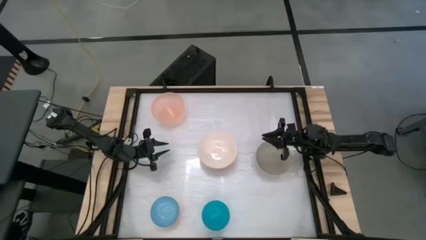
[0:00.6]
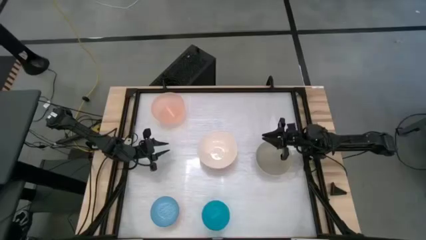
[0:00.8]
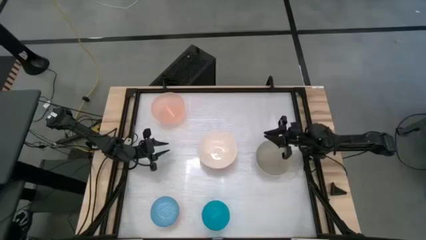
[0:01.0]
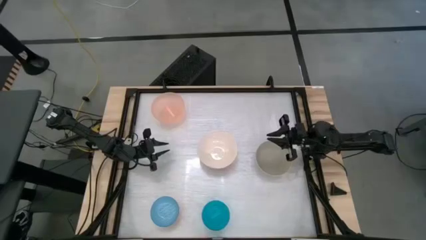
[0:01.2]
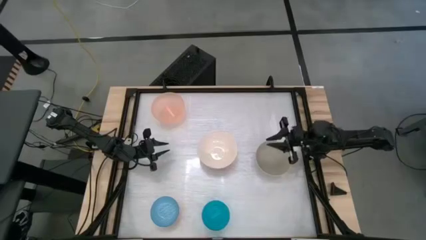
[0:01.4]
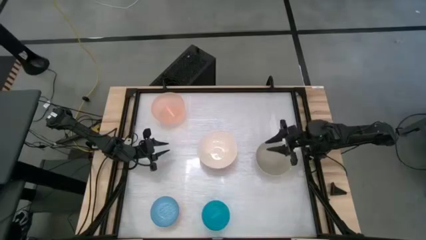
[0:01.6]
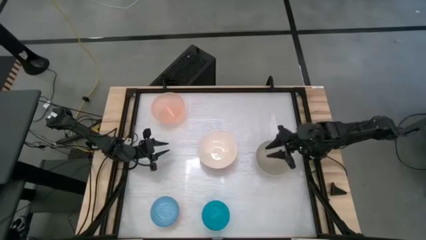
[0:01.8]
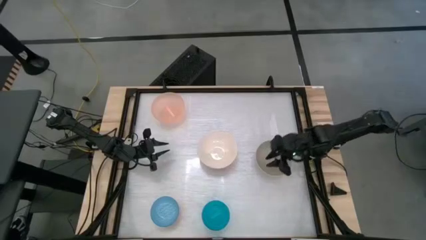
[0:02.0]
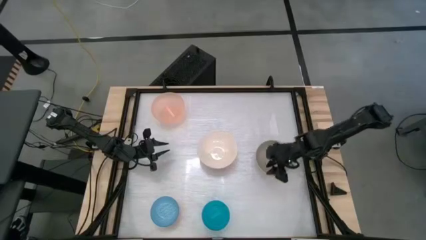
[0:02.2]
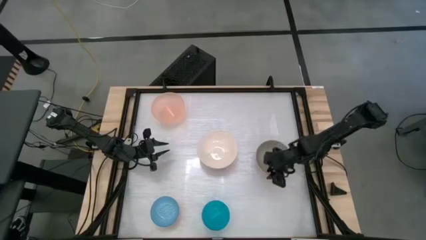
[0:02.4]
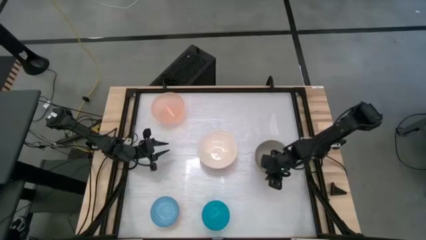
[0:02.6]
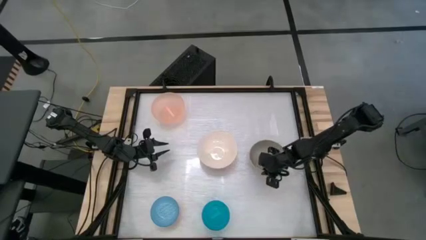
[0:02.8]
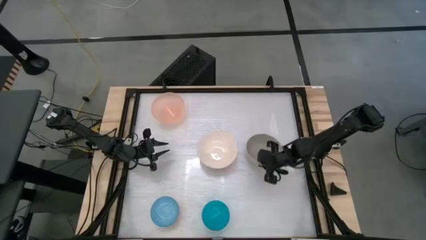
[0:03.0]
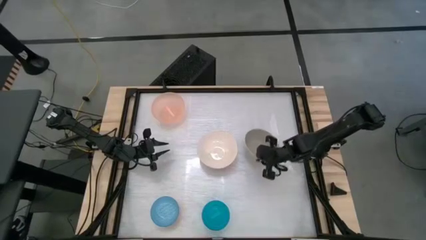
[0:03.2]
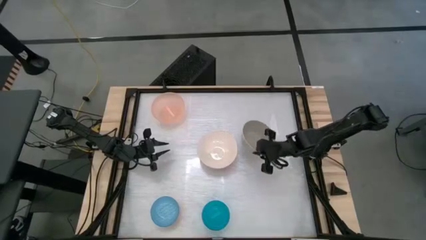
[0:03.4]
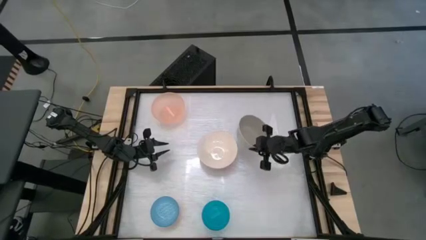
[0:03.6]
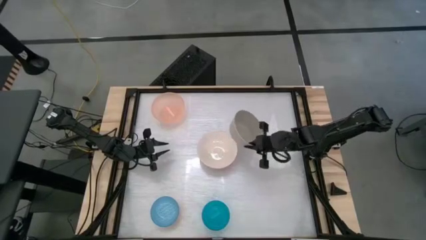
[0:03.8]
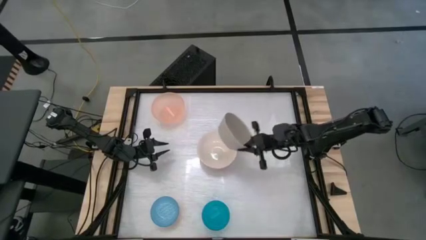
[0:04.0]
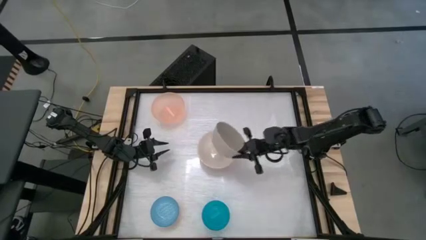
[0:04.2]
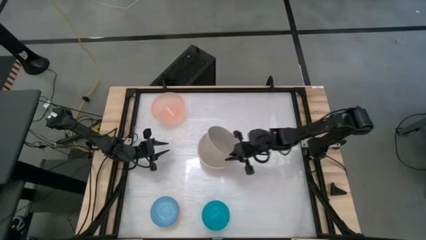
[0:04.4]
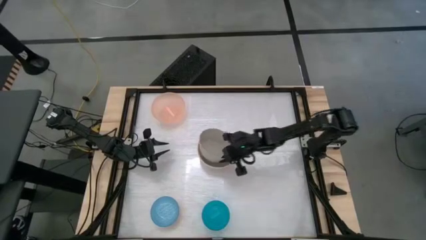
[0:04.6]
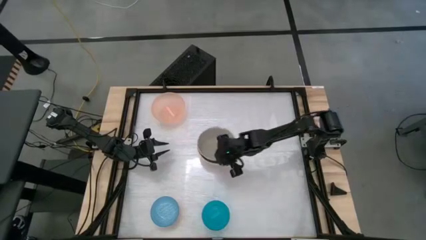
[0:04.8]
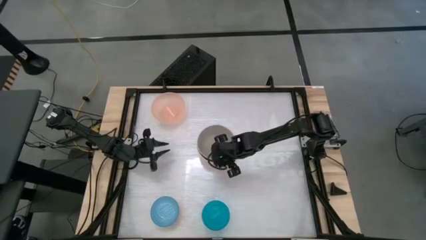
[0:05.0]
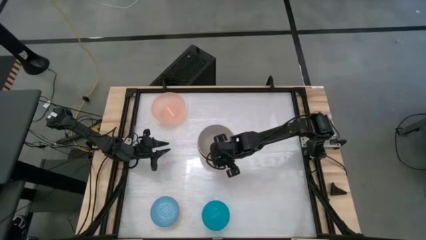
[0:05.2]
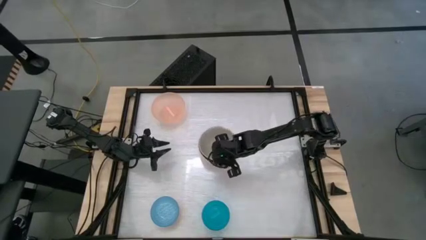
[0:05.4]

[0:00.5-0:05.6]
Stack the gray bowl on top of the white bowl

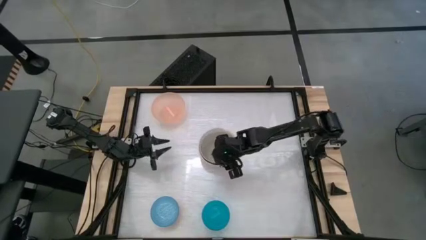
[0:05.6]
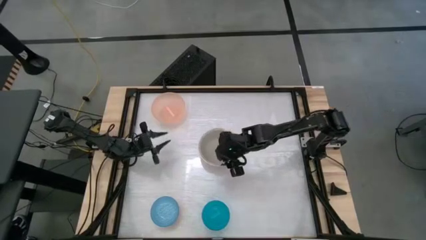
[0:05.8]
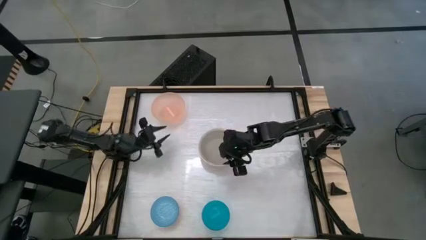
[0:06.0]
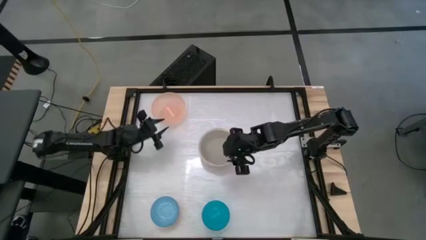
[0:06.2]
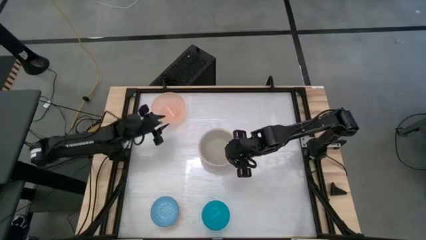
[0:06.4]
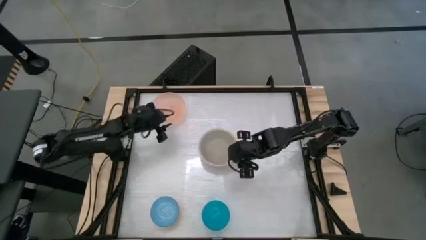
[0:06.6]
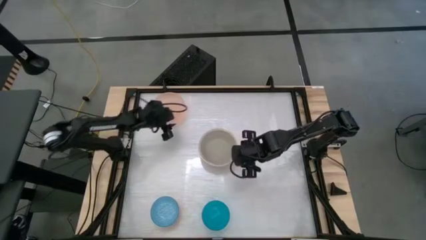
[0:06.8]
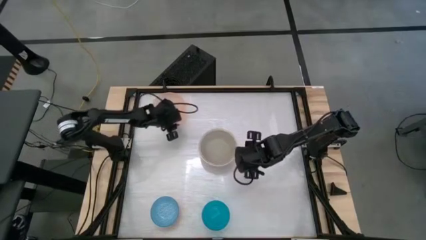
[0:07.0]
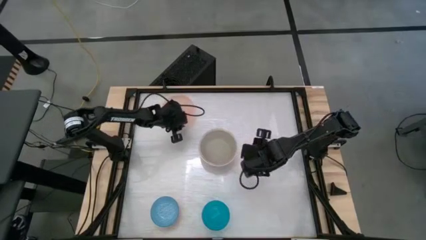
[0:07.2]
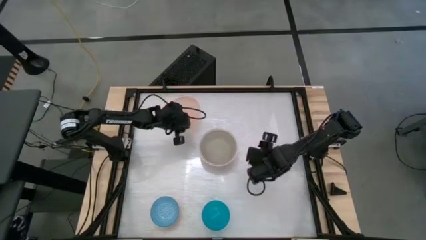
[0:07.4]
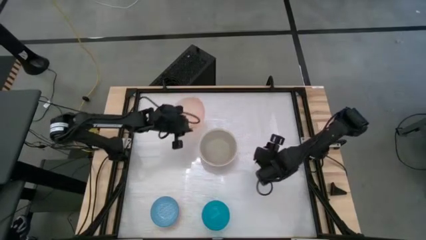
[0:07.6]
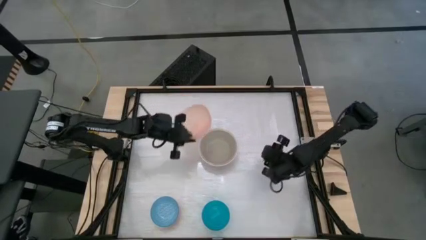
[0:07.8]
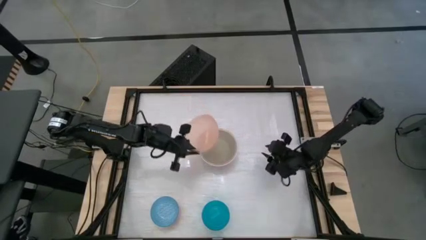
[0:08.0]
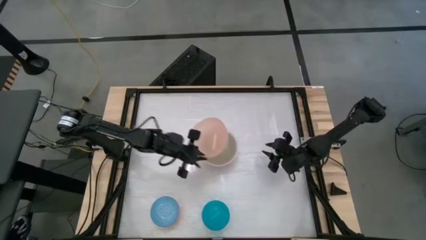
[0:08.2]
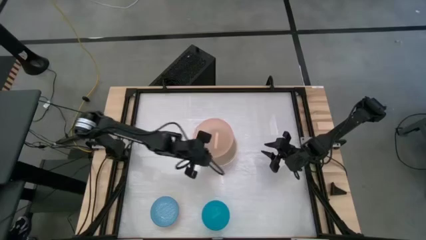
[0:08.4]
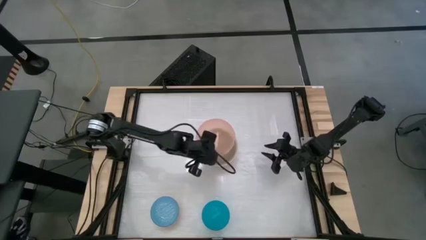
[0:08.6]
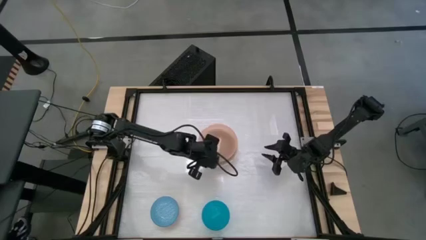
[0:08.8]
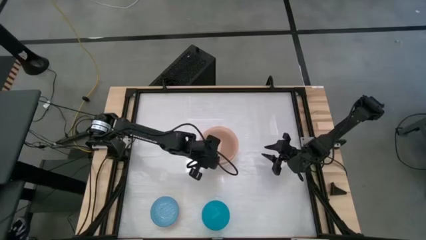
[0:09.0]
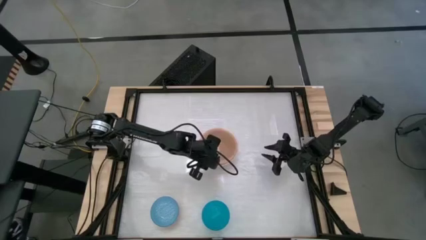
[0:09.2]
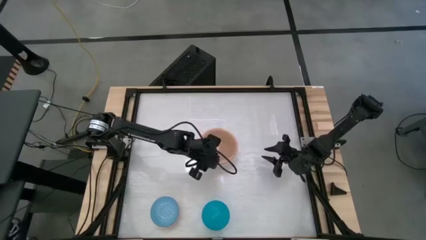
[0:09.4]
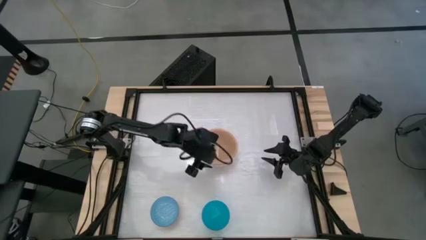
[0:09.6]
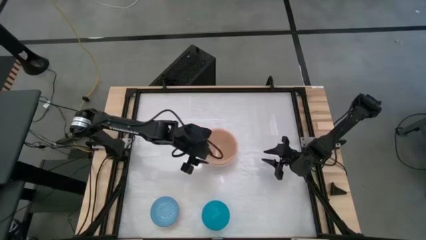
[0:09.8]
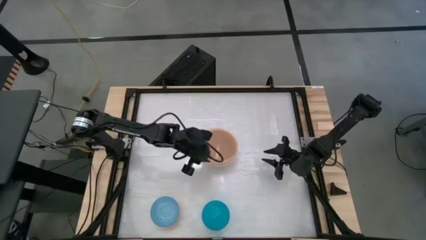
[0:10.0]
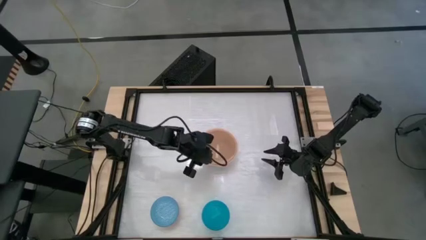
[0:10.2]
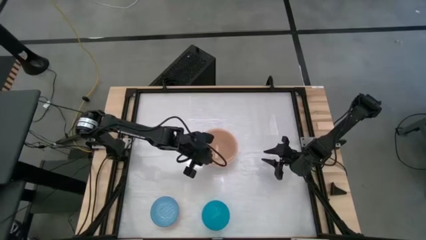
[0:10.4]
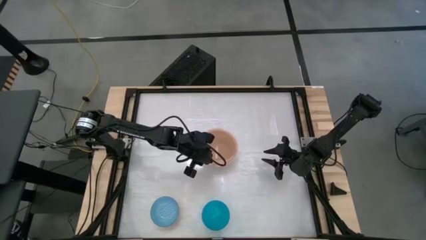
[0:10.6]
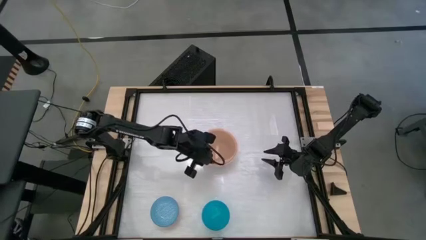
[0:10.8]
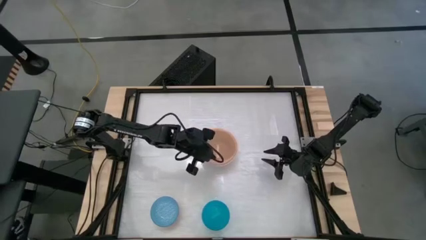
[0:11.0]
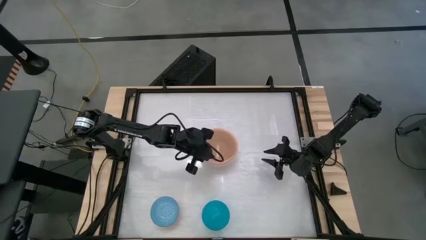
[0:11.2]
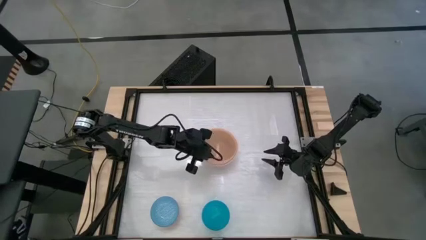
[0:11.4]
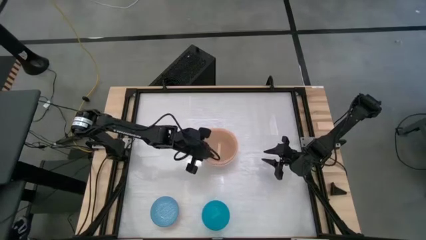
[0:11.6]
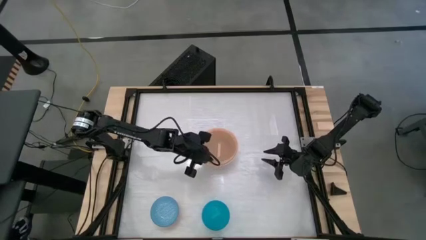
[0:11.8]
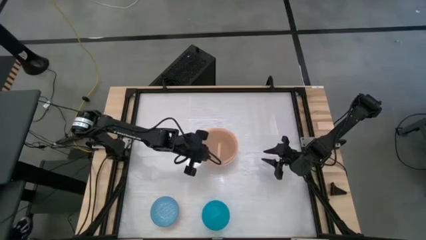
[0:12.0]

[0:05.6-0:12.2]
Stack the light orange bowl on top of the gray bowl

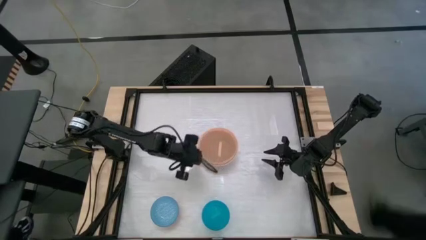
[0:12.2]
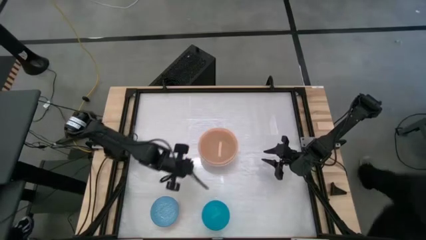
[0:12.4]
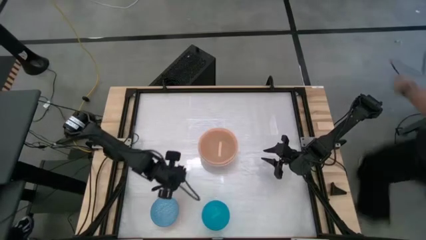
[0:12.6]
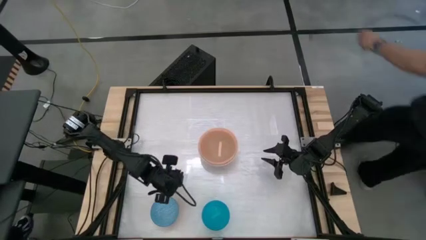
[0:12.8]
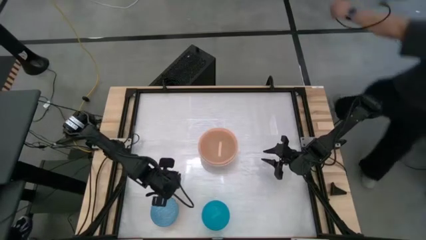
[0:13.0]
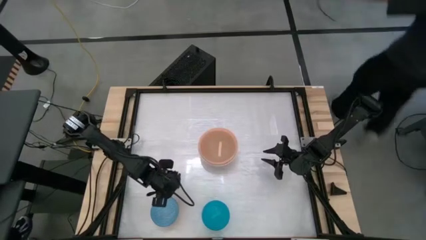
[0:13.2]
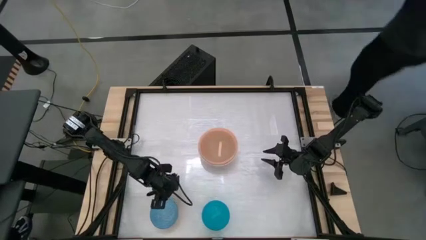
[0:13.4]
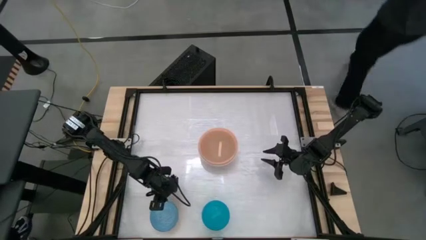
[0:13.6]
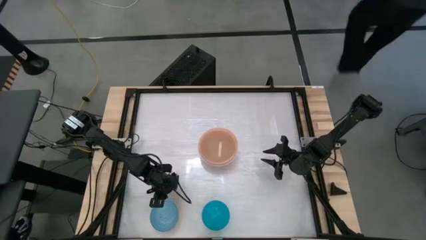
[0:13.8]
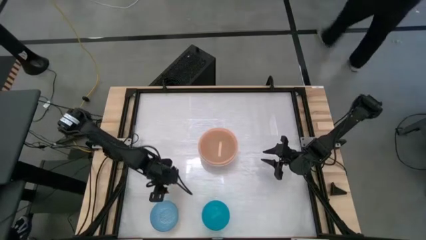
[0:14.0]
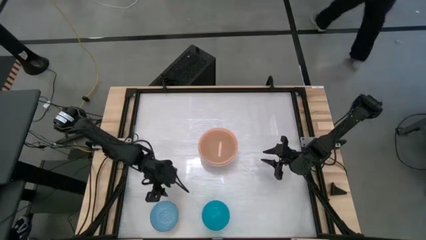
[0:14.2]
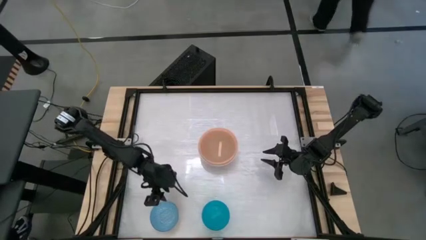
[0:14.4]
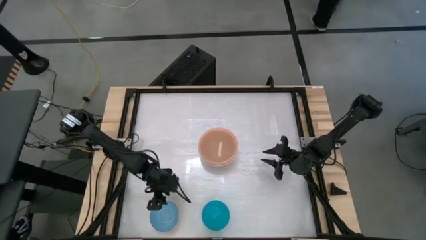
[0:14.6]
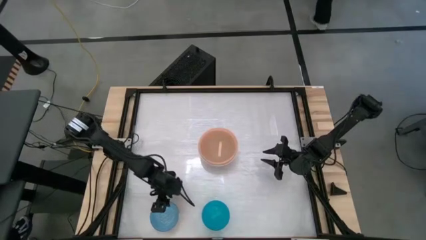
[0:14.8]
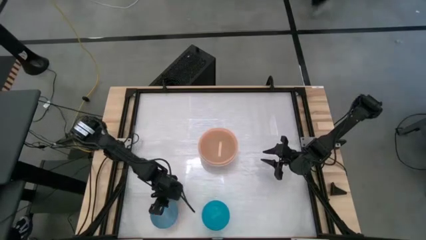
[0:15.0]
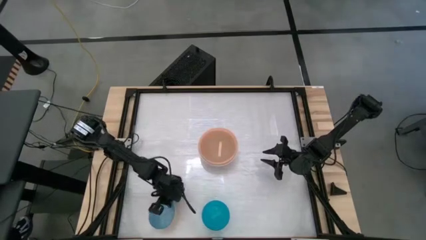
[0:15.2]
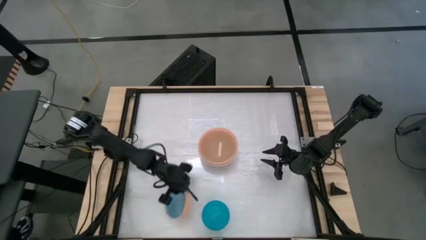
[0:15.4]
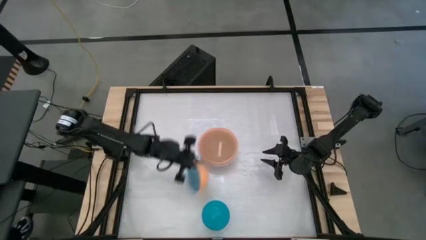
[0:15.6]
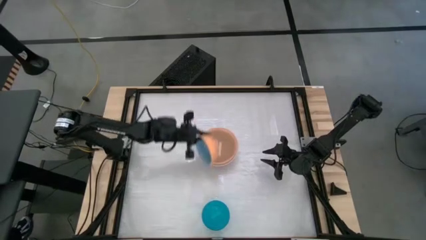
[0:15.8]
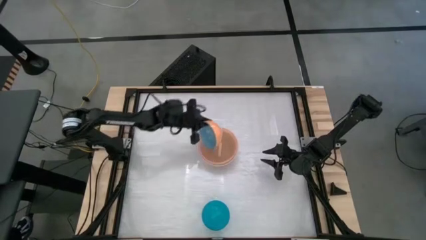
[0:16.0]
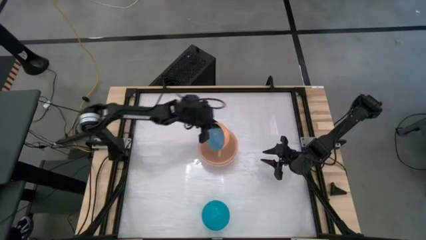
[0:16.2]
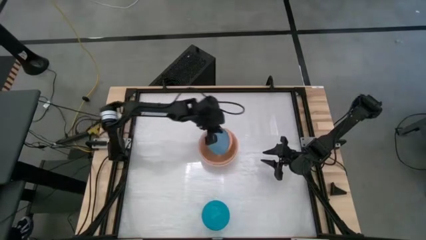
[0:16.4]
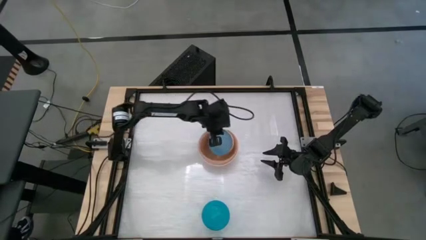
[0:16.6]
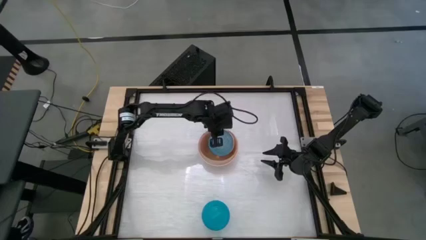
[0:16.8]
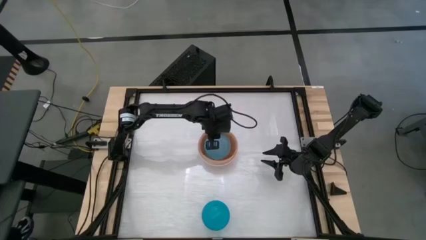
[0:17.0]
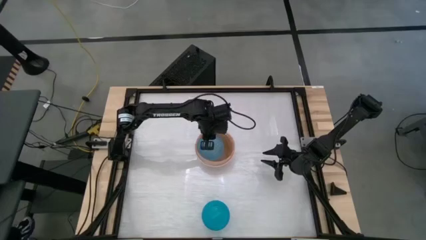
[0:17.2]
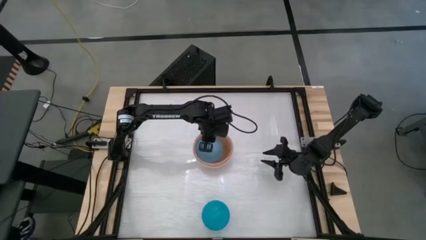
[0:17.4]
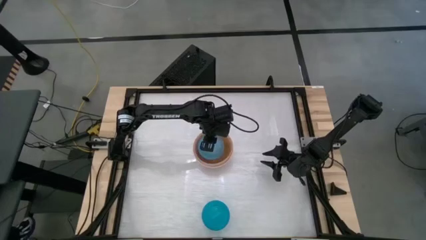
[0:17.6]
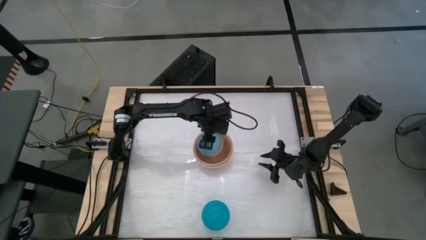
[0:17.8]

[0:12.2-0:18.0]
Stack the blue patterned bowl on top of the light orange bowl

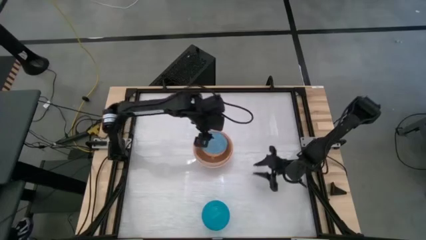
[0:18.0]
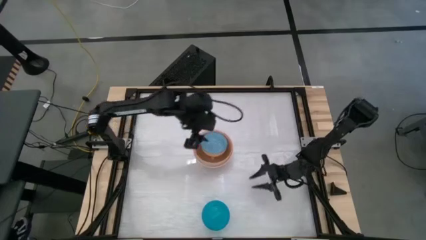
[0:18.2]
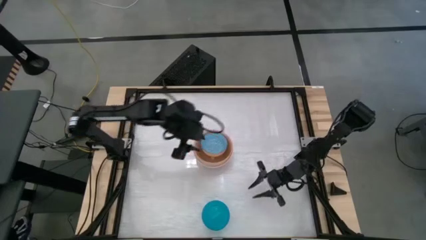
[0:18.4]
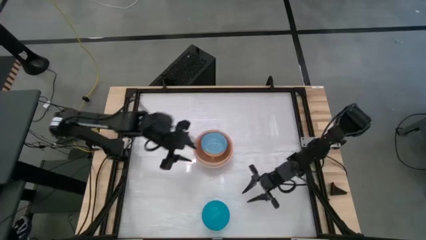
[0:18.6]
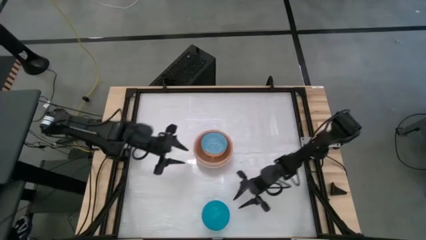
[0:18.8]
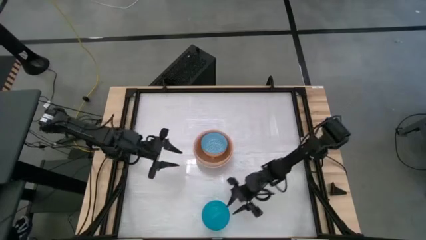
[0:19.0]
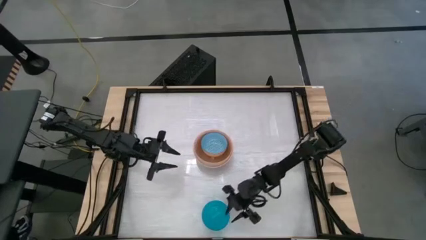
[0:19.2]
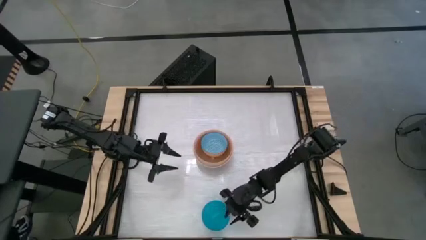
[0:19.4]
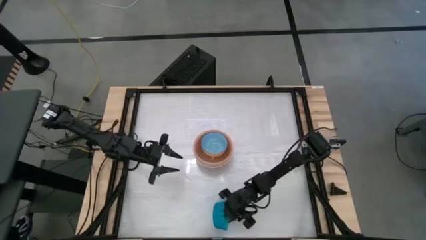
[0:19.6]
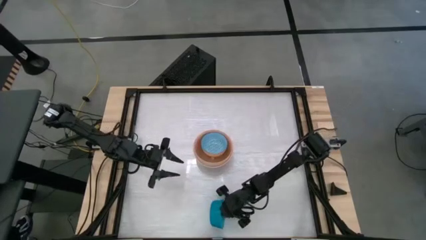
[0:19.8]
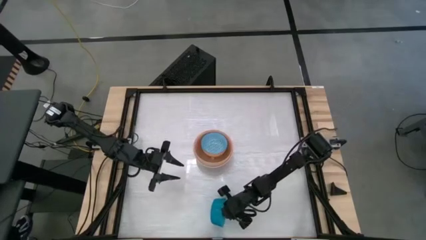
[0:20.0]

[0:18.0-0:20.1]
Stack the blue bowl on top of the blue patterned bowl
